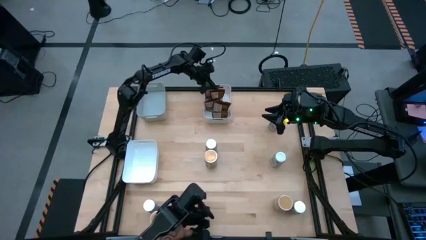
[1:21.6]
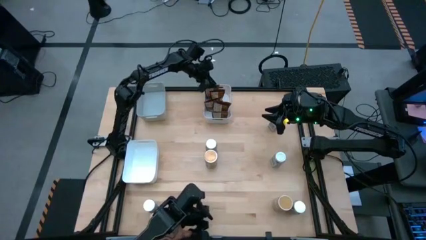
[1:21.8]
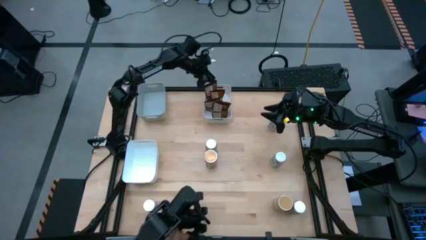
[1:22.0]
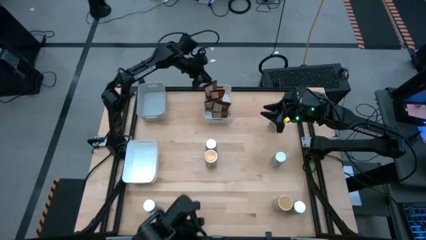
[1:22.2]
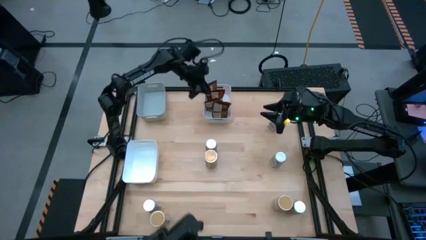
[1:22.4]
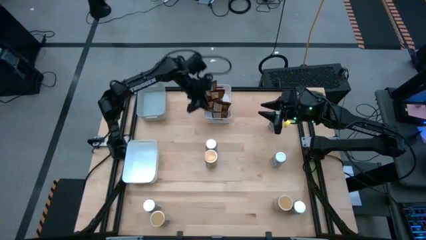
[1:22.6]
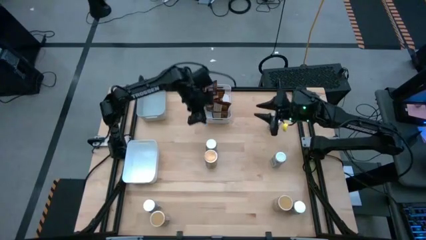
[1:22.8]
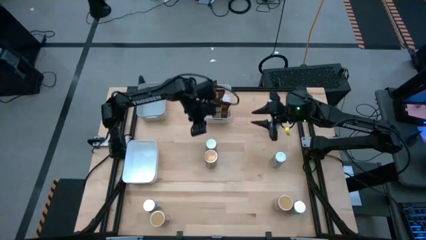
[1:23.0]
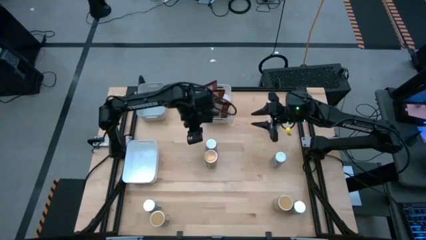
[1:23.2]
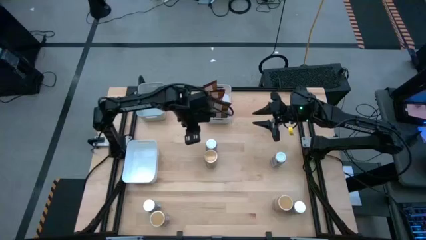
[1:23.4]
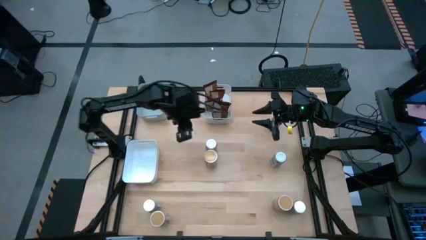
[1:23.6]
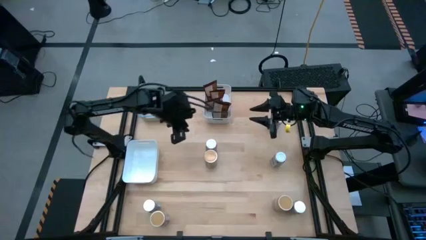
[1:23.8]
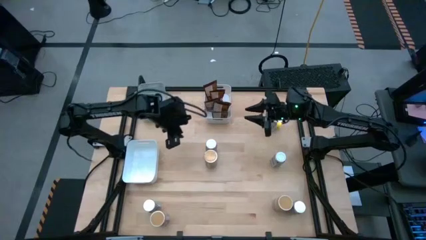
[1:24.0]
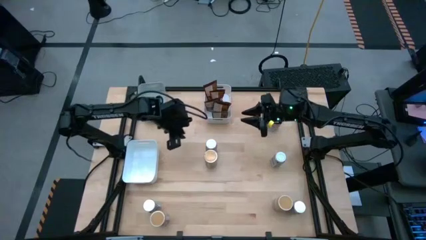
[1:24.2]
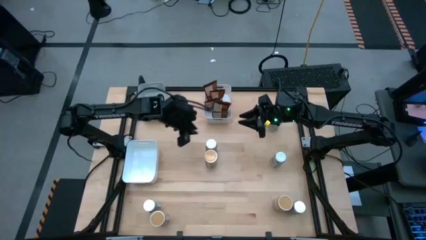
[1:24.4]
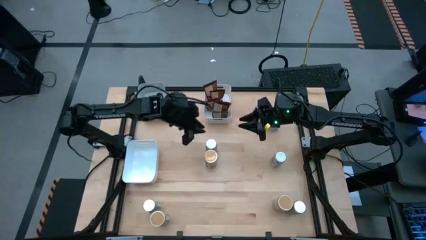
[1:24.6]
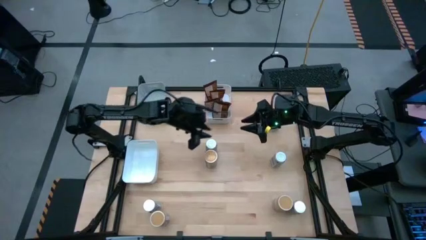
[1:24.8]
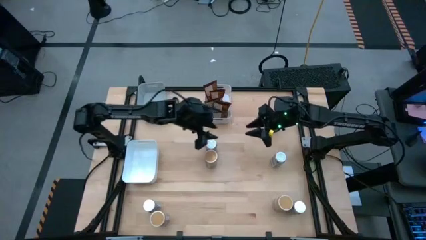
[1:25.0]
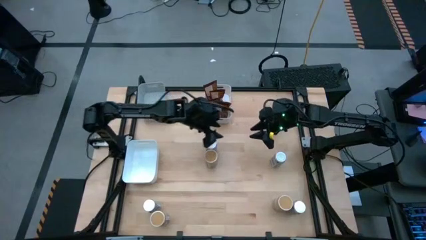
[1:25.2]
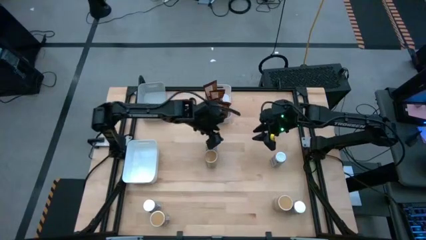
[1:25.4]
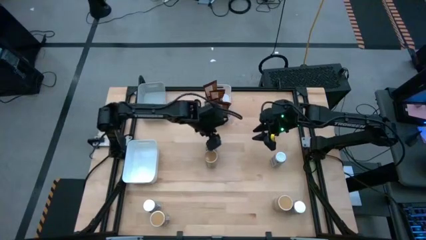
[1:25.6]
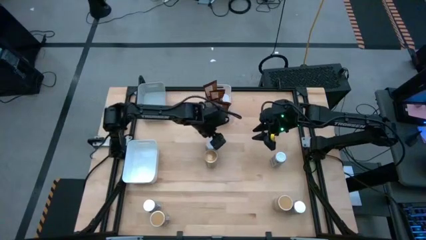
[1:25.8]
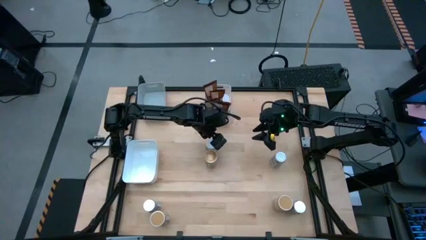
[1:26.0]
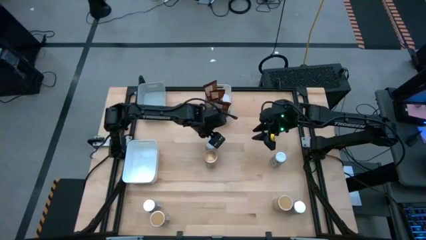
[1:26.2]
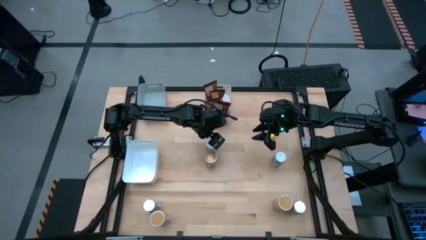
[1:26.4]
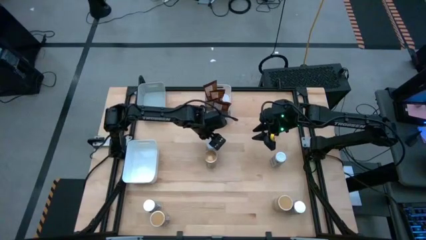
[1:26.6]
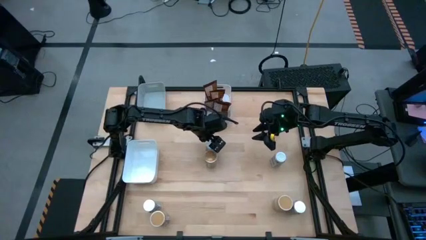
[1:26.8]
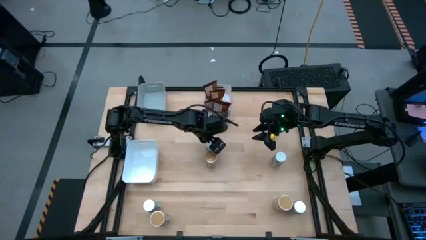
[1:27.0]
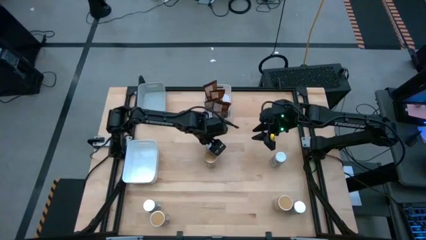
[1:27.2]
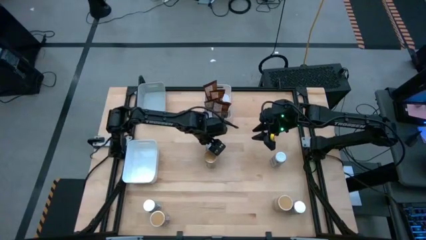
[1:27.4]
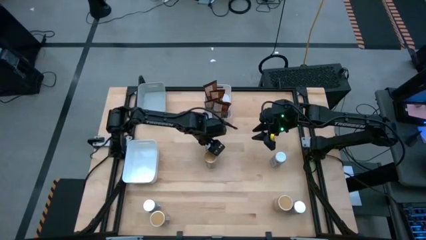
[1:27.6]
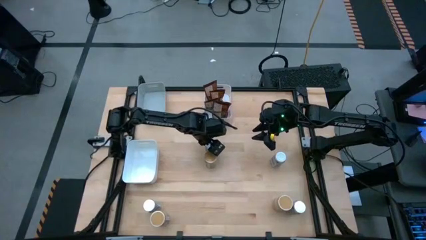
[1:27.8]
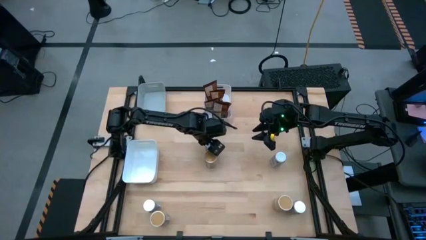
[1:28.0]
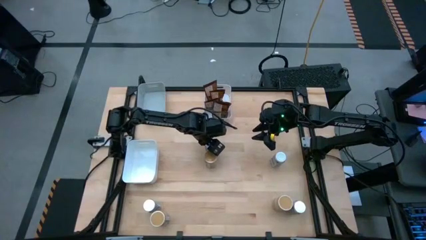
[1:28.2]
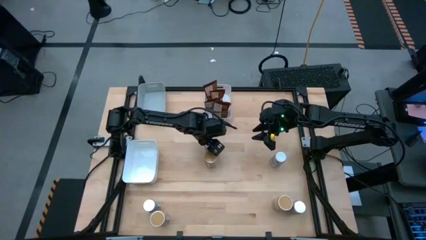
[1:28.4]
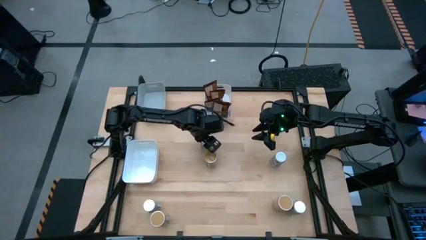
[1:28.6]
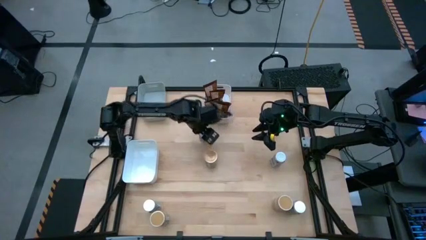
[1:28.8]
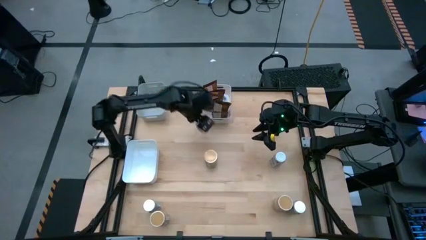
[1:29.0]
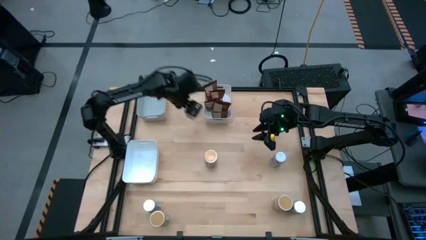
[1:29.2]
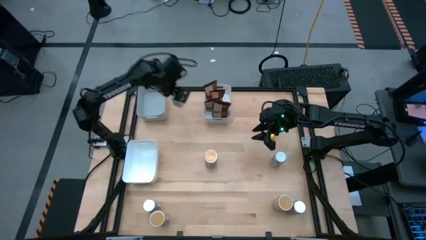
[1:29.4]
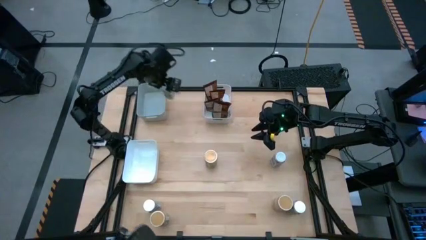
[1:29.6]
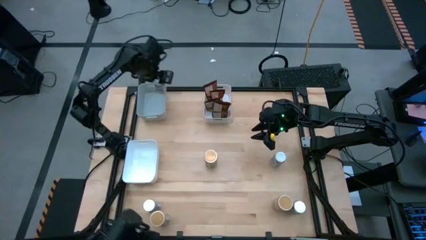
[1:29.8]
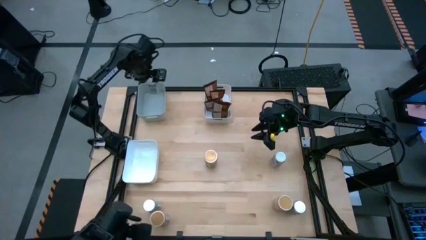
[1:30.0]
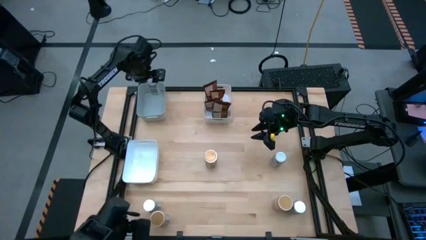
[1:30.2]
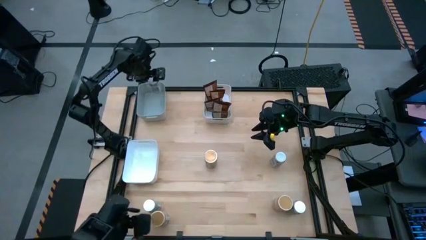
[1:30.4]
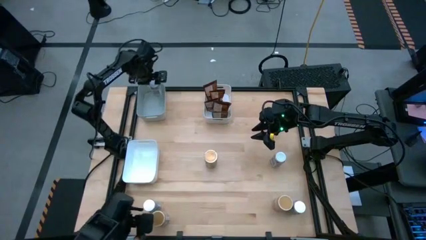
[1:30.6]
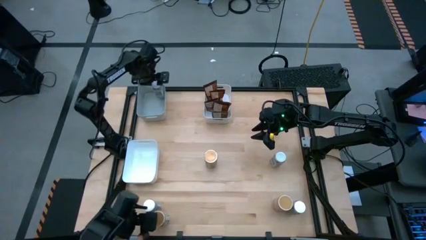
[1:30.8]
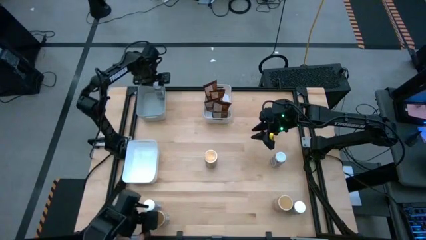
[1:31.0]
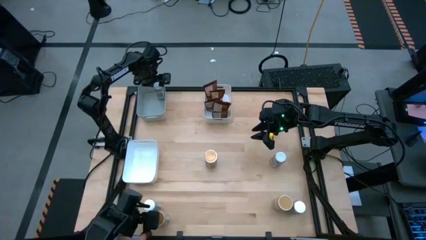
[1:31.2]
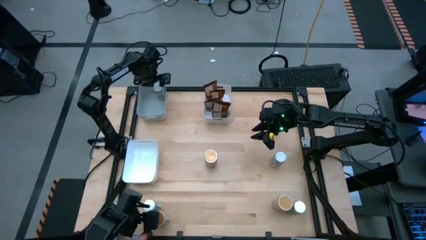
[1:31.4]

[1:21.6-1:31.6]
Task: Sort spices by type
Put the white seasoning bottle into the gray bin

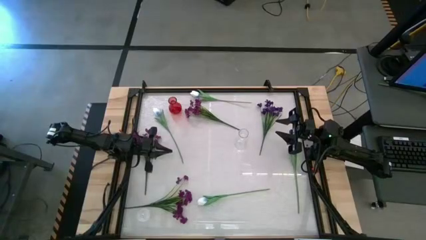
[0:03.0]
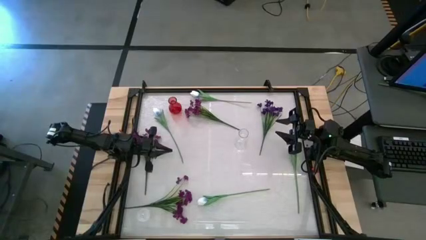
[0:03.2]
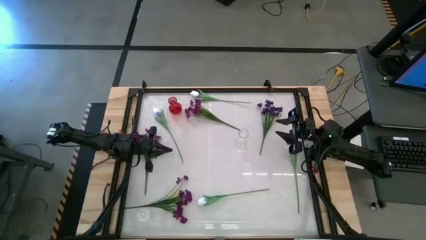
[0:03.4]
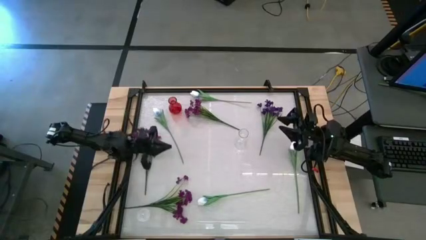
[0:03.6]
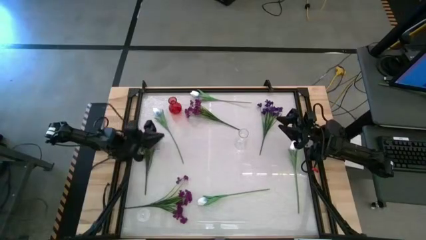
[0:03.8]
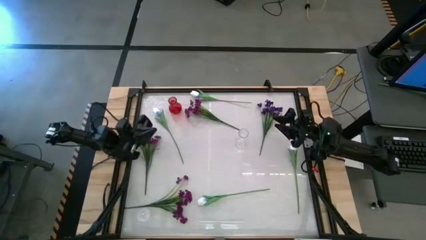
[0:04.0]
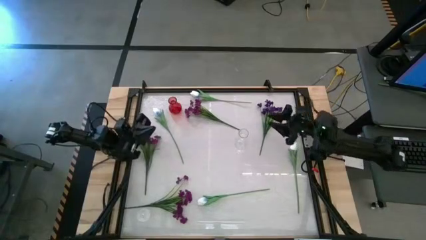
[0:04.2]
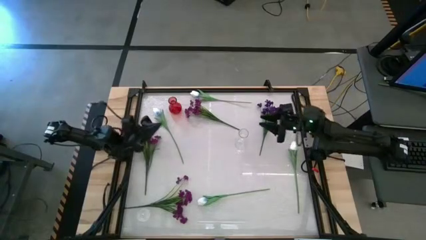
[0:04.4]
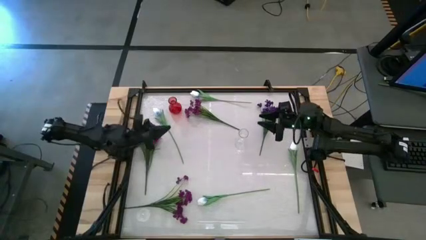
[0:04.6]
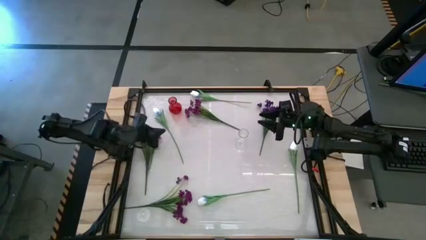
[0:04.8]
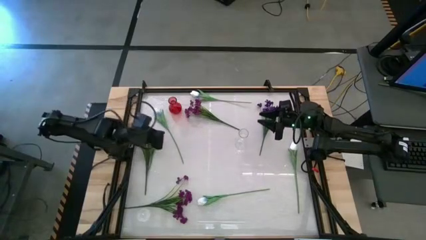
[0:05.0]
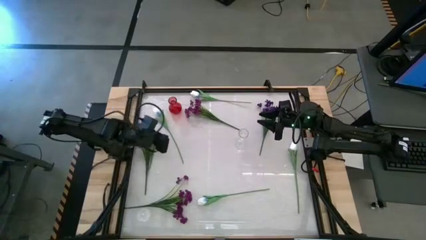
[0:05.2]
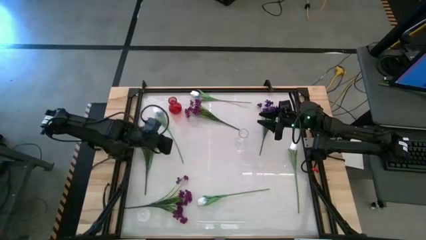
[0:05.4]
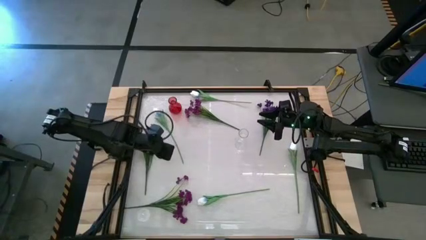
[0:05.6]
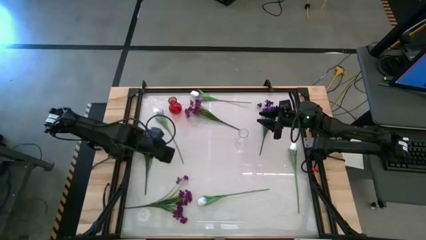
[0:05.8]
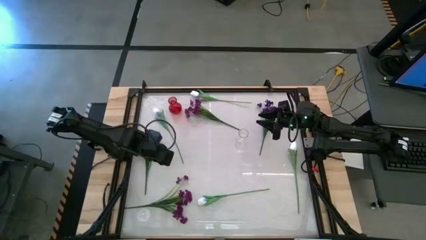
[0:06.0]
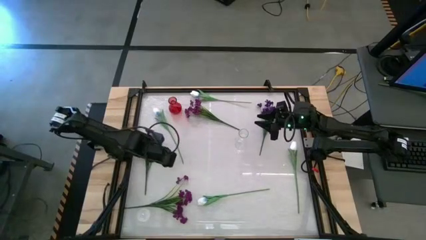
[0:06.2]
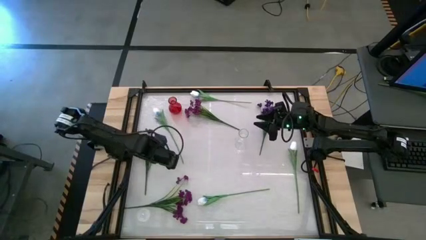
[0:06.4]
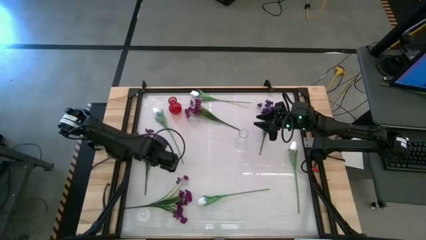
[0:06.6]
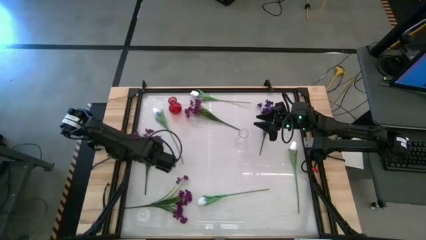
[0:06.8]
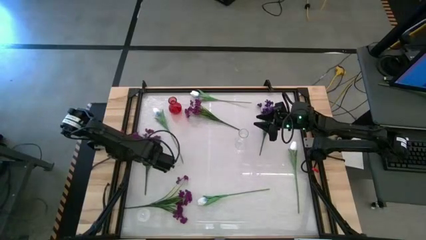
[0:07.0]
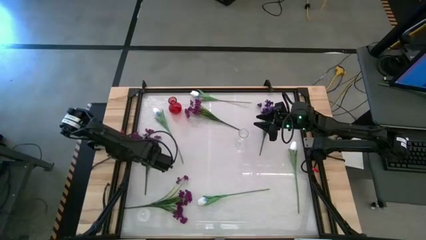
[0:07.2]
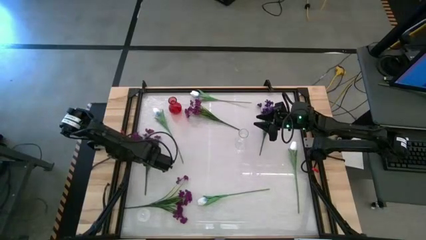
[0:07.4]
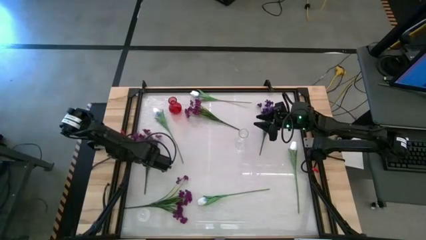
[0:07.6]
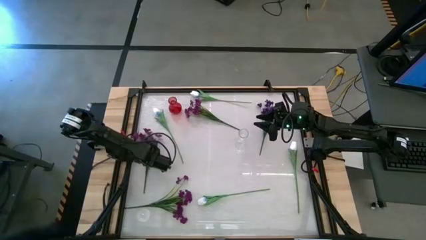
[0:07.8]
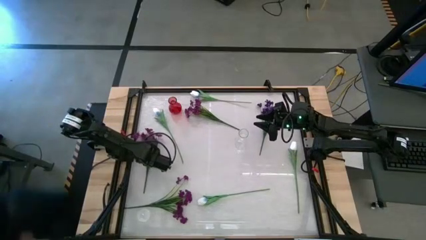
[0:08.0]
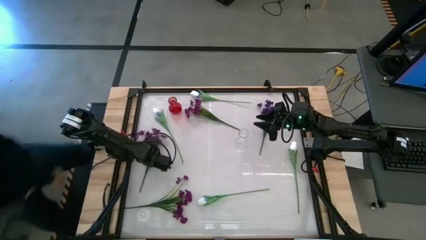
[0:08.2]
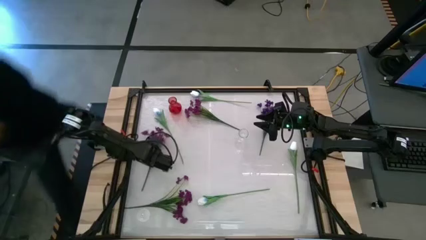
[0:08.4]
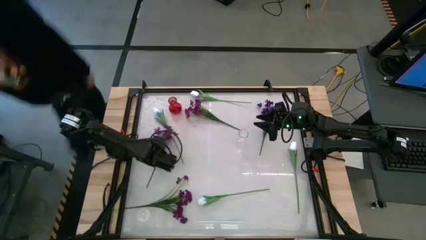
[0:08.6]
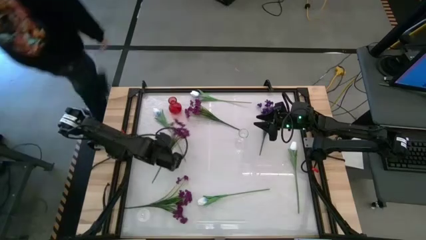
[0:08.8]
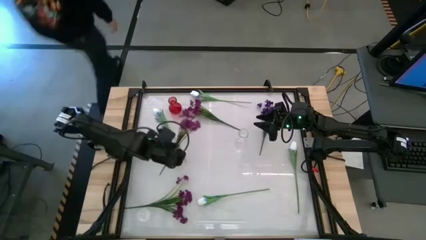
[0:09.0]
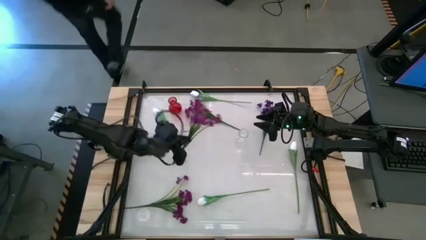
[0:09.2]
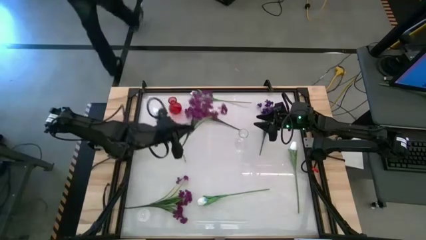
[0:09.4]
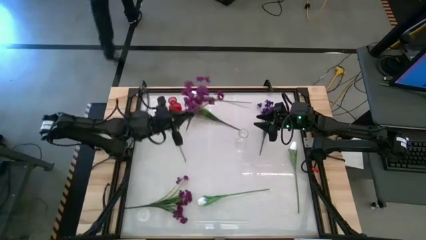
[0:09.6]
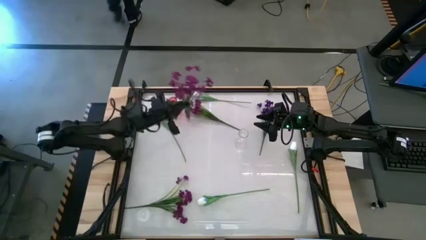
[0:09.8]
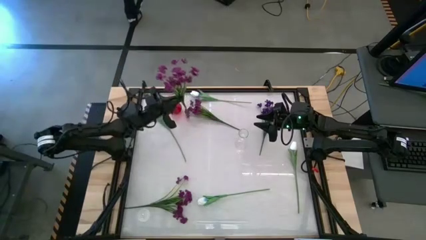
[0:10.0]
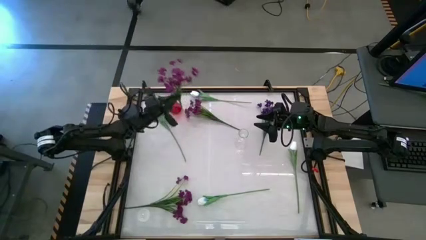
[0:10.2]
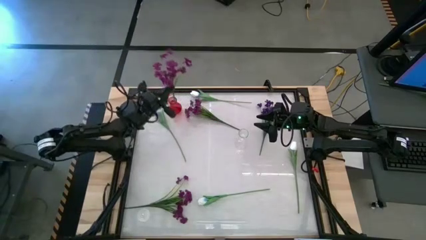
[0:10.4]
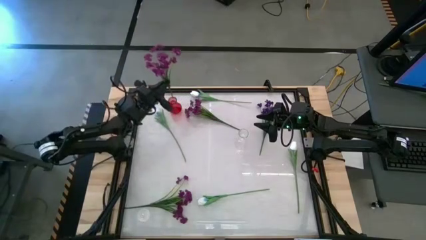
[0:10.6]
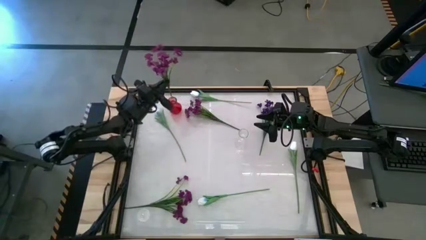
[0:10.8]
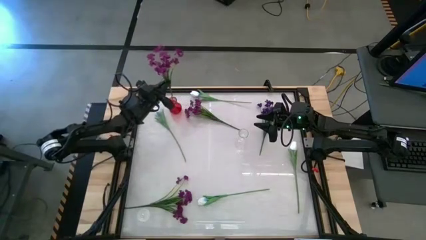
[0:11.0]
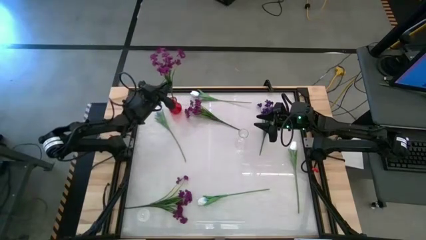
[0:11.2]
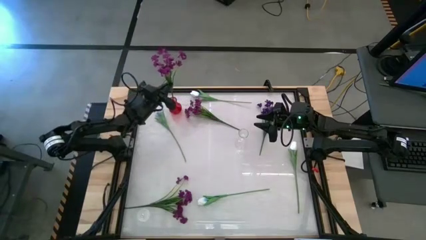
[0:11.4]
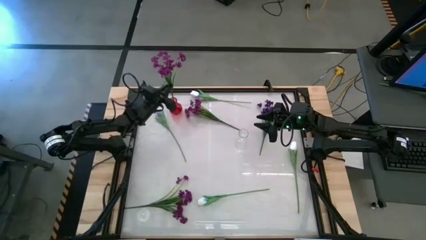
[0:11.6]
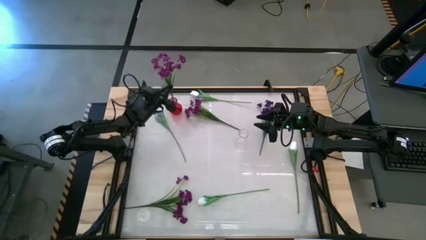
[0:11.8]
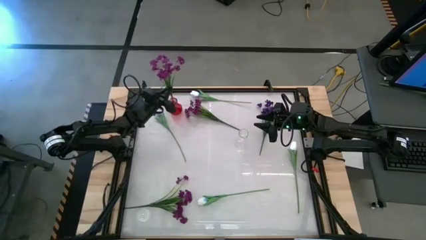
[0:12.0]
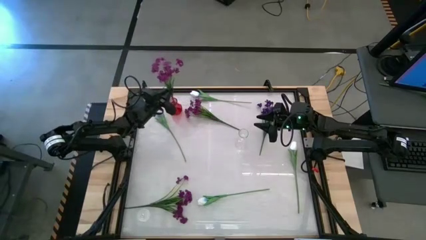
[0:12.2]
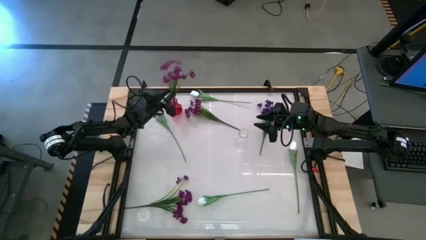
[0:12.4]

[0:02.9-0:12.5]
Task: Sort flowers into vase by color
Put the light purple flowers into the red vase
